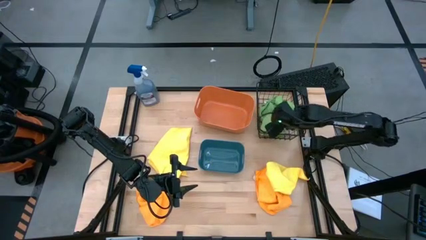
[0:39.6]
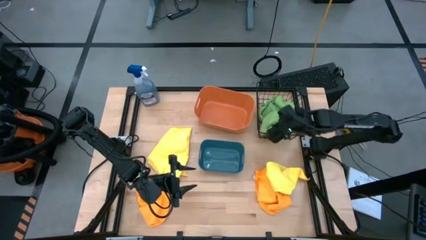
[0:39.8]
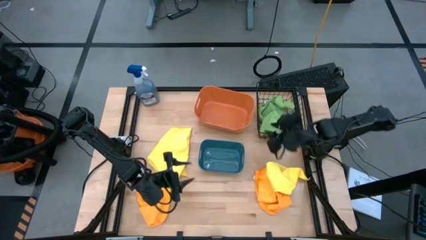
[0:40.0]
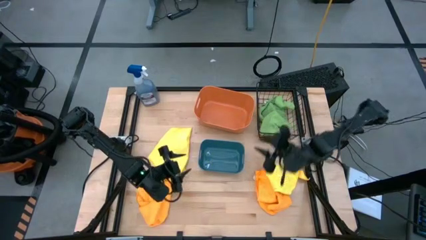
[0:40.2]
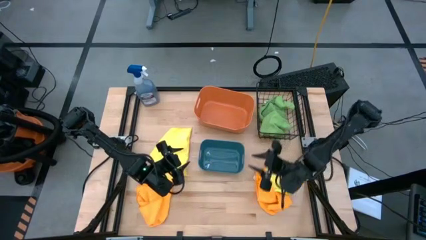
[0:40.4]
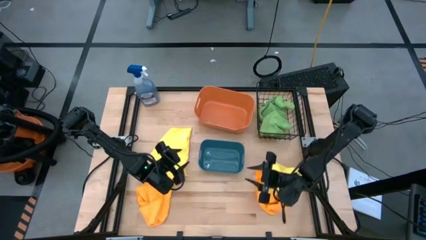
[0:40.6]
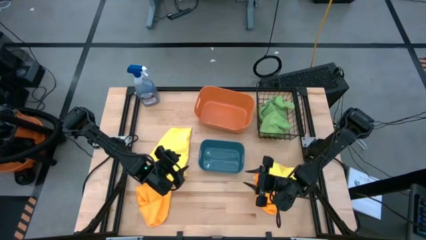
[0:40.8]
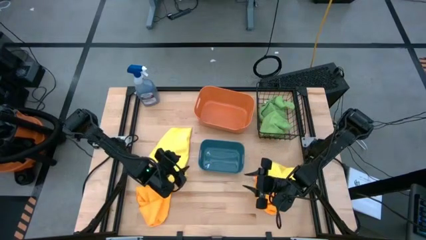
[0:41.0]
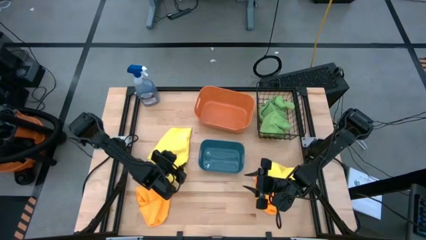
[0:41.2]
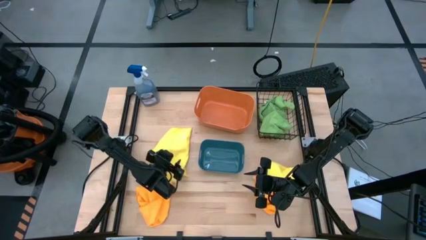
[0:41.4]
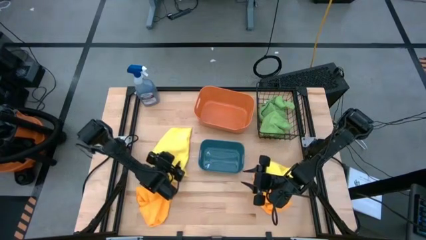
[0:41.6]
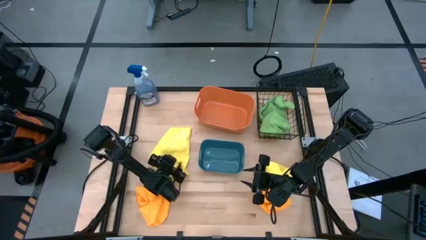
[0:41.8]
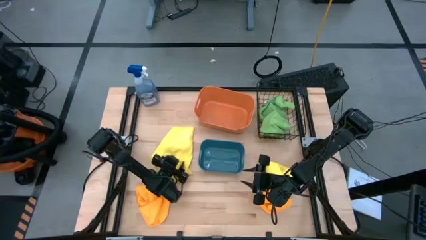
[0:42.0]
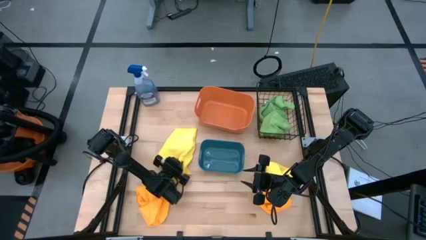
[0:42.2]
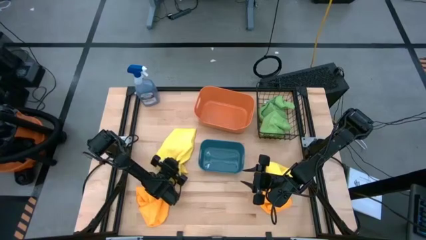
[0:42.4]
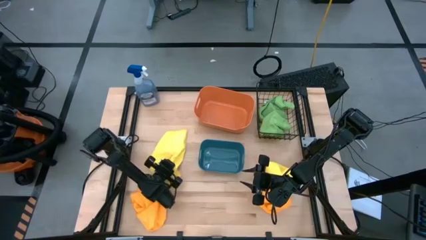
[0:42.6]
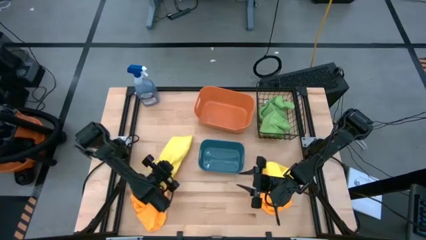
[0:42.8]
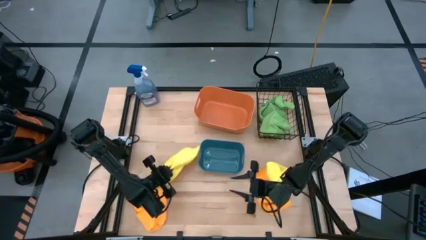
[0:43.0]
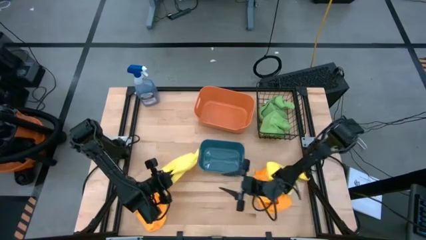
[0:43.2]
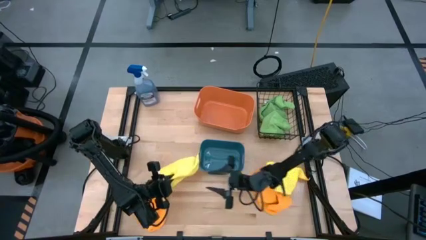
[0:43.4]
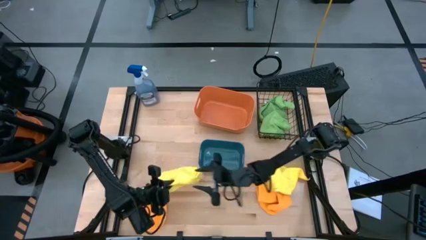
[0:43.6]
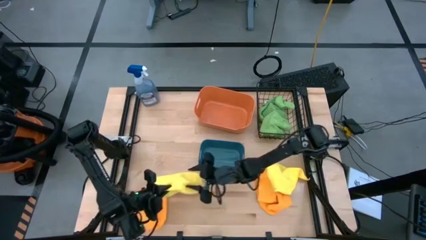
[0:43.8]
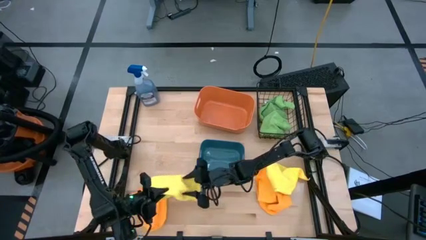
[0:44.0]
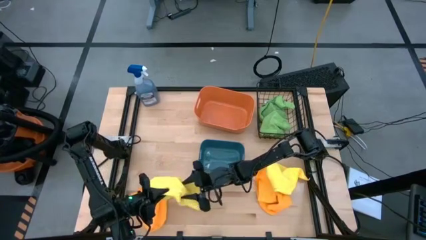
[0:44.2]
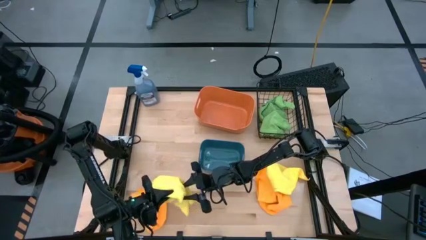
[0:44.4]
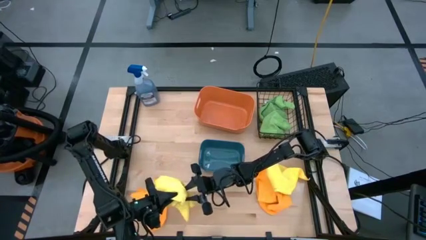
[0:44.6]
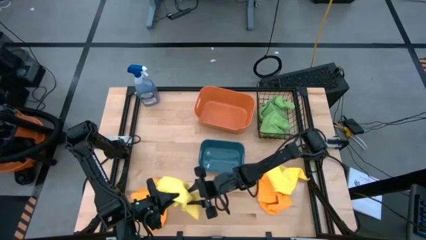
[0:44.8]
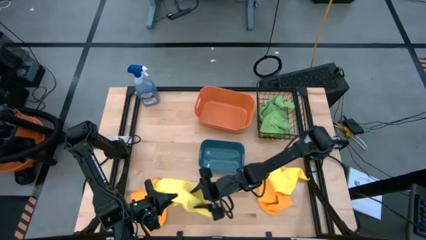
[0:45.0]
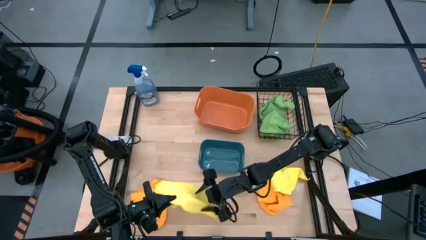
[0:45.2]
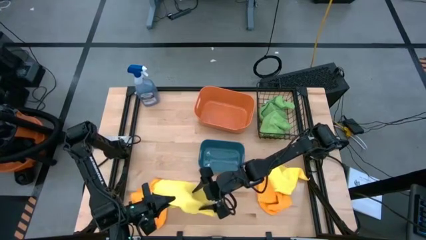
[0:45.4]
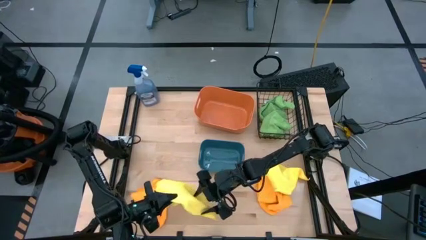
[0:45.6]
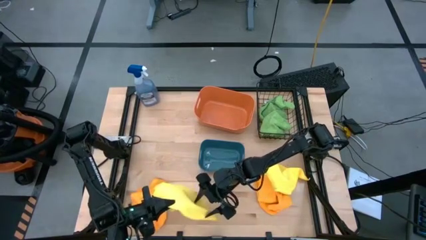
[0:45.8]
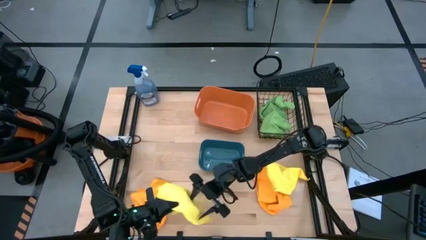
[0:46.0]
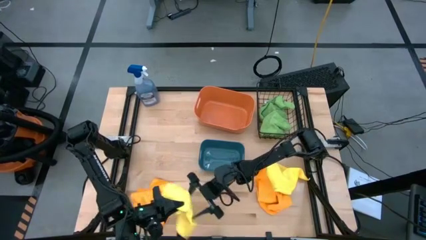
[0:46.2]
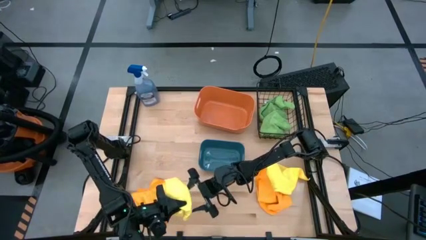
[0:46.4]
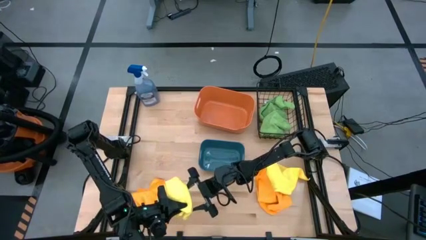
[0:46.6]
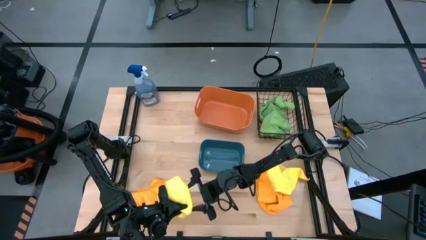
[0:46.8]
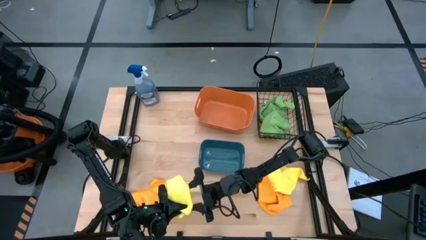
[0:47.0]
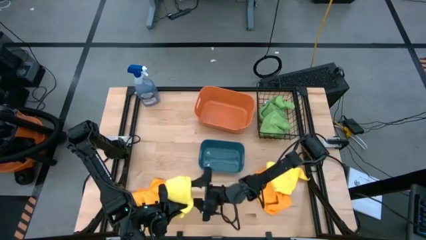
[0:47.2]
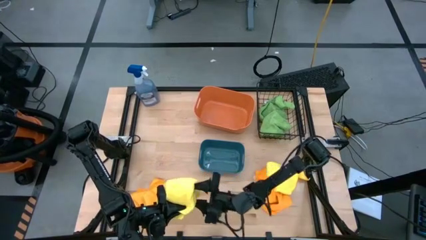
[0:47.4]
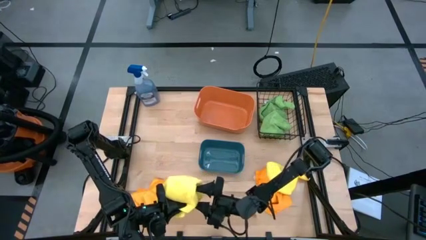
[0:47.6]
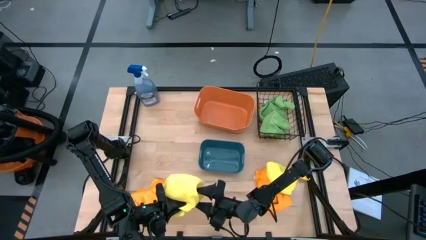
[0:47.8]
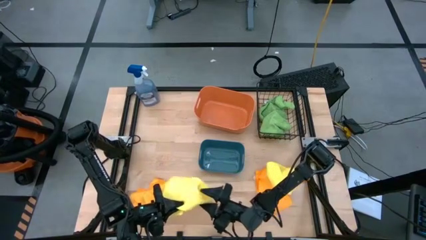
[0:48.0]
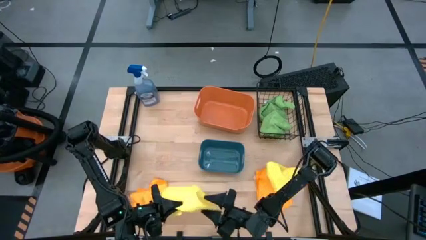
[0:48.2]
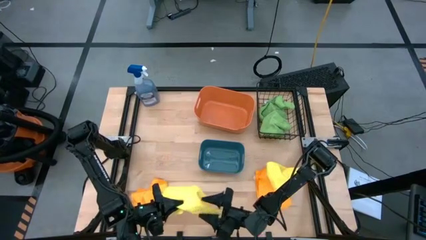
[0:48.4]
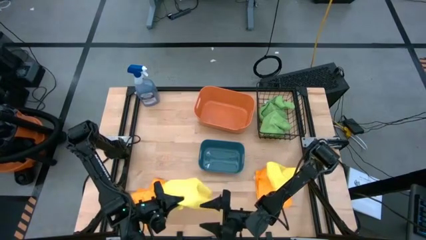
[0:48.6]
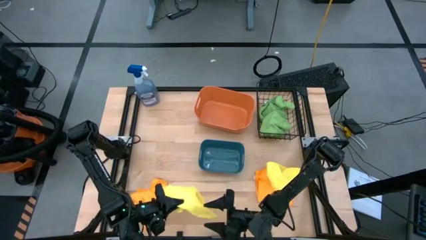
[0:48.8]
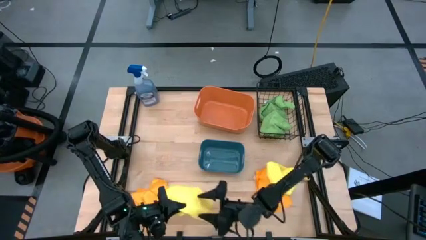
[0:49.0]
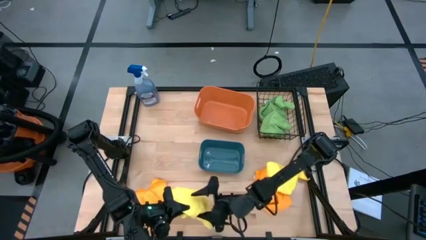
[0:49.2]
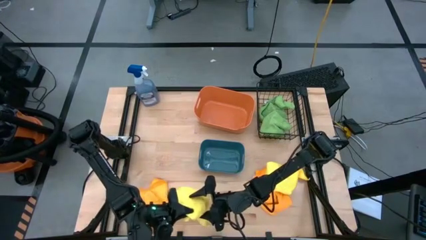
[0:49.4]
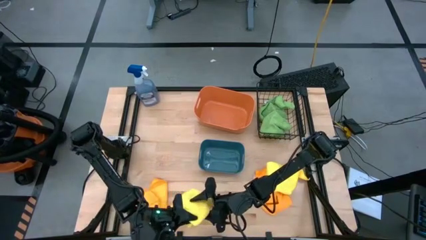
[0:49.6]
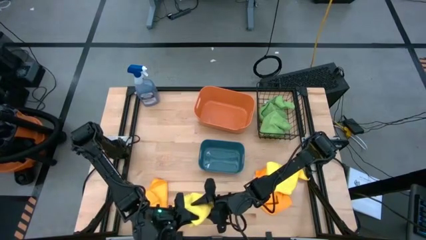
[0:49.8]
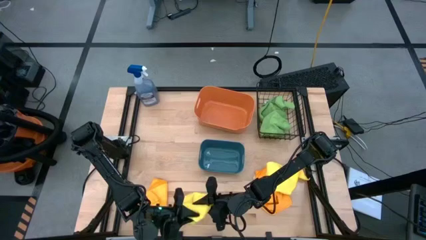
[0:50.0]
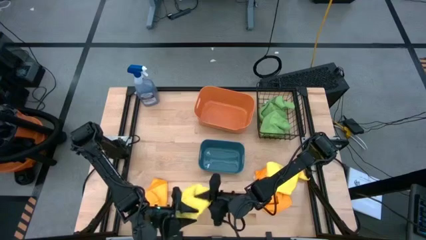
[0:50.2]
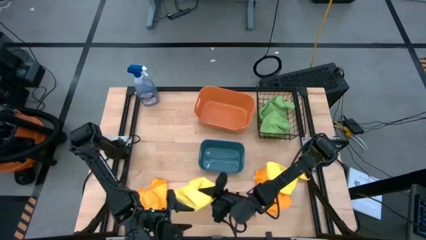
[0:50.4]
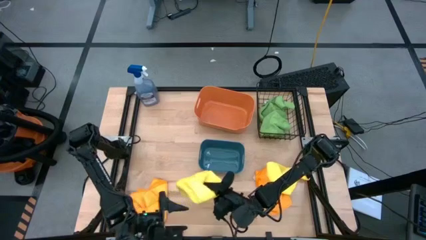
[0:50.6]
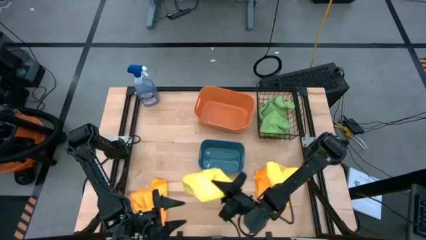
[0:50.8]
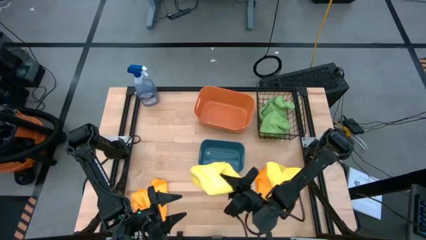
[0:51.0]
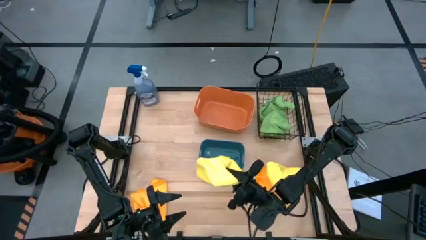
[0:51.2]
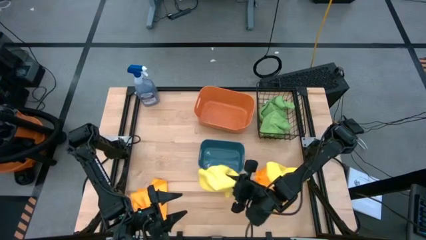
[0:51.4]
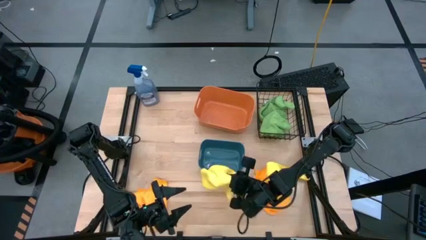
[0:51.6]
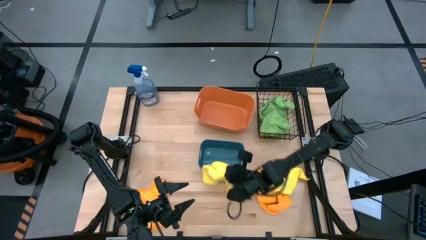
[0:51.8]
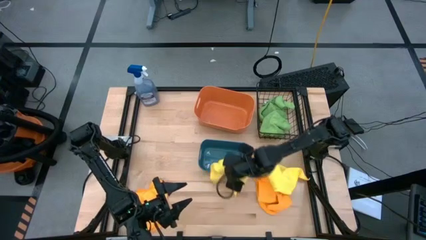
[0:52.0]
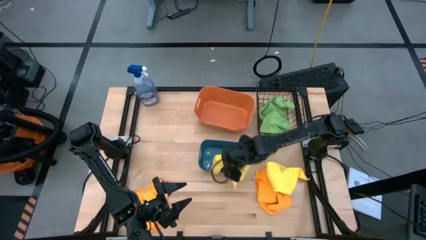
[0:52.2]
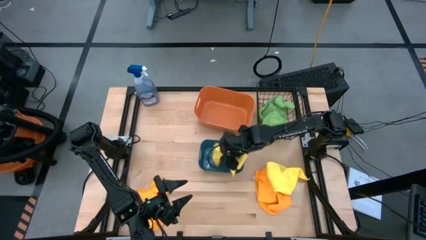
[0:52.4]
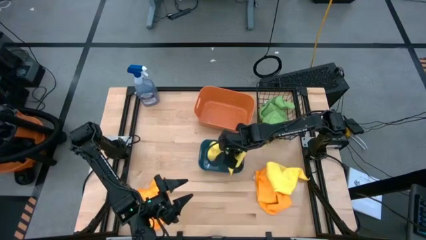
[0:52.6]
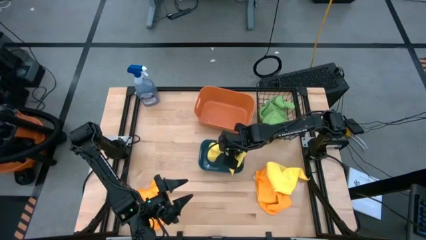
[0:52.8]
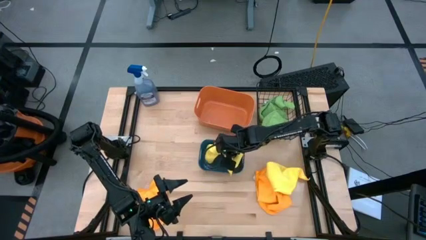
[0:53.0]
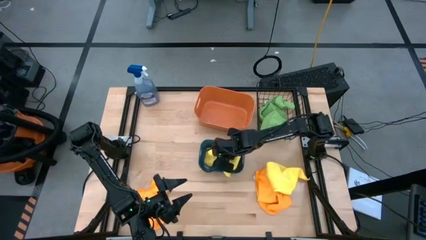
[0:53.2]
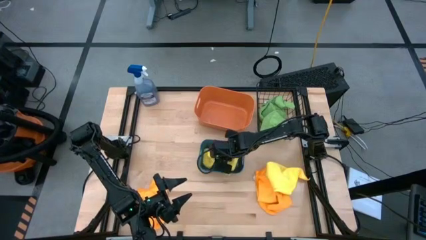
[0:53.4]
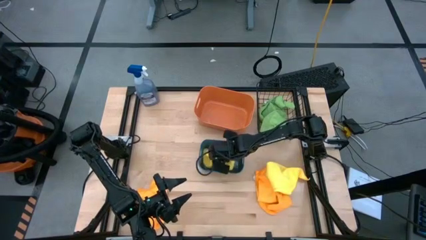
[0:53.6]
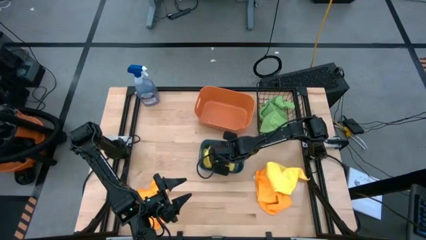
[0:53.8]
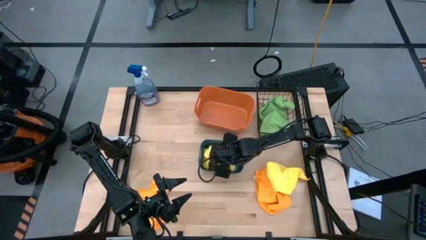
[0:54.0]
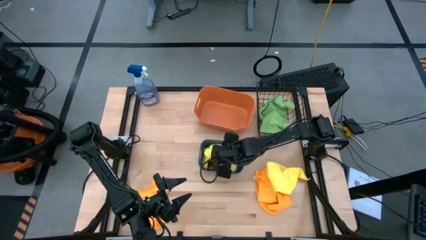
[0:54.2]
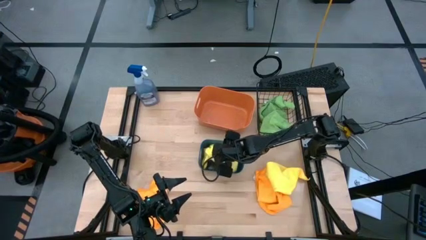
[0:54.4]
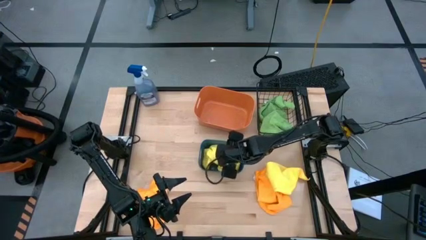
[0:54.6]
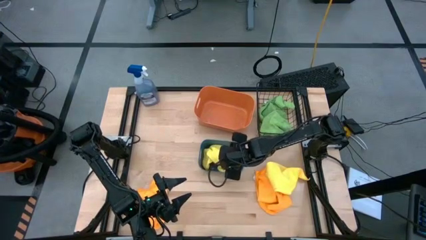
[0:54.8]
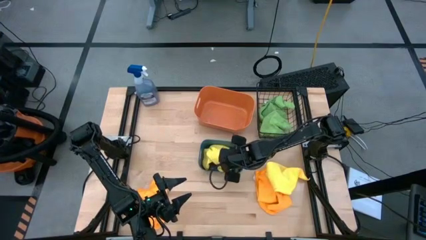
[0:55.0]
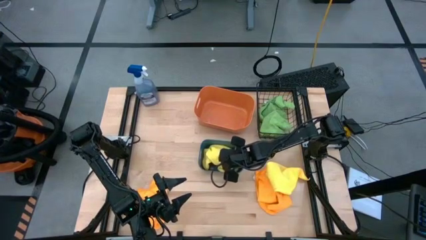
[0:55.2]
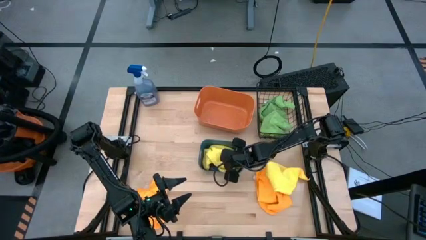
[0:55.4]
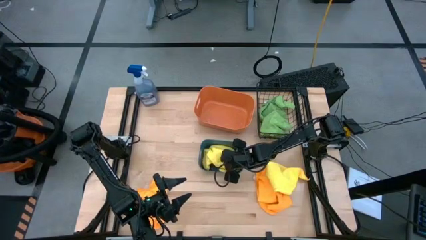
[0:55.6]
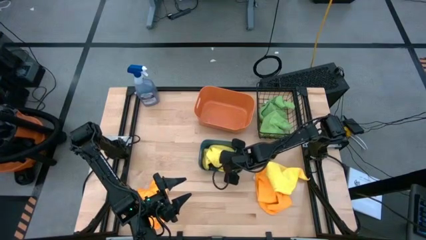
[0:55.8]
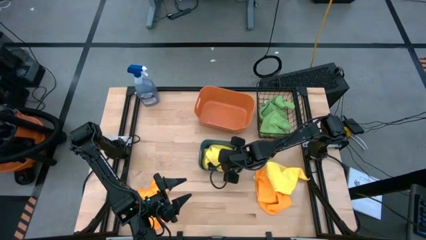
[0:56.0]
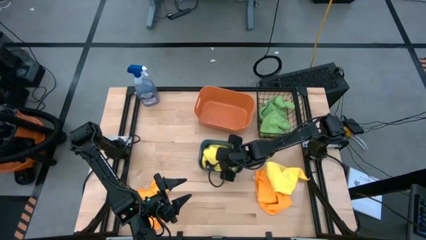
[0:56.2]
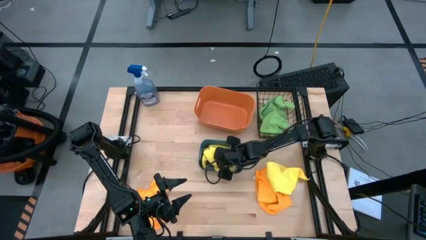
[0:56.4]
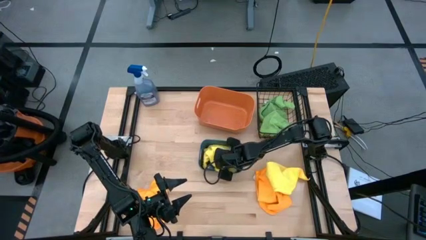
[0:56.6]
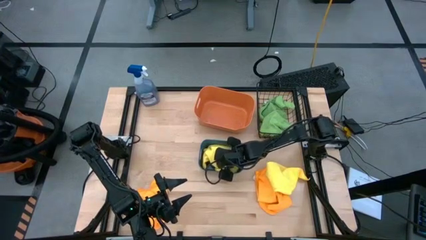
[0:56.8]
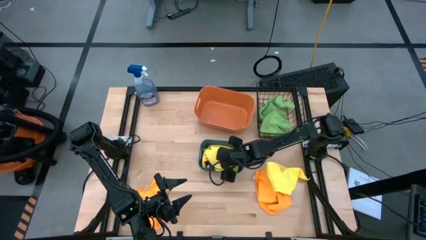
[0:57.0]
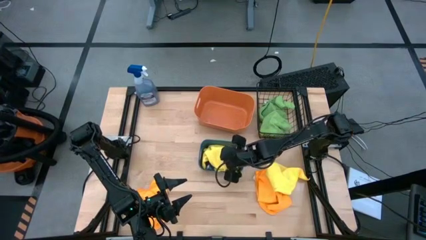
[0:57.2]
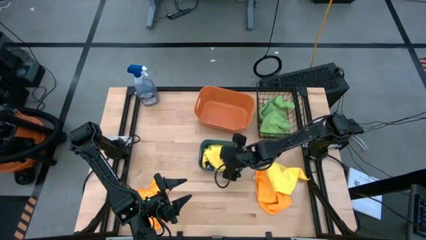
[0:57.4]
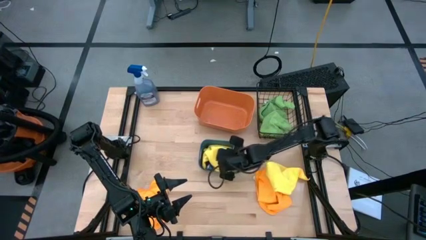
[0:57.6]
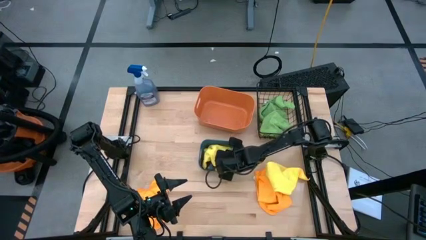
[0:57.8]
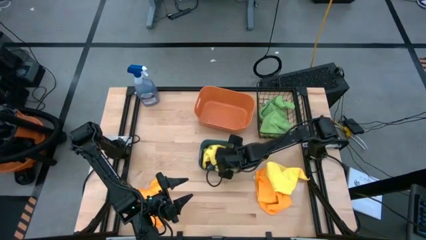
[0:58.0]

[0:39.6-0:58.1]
Task: Sort microfiber towel by color & place in baskets
Put the left yellow microfiber towel into the blue bin
